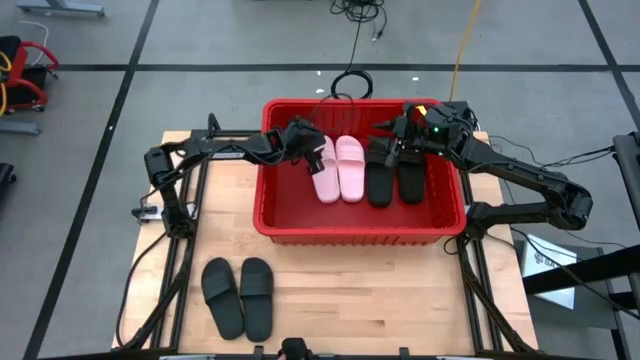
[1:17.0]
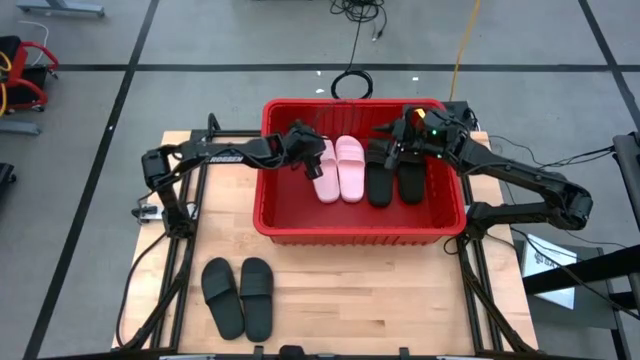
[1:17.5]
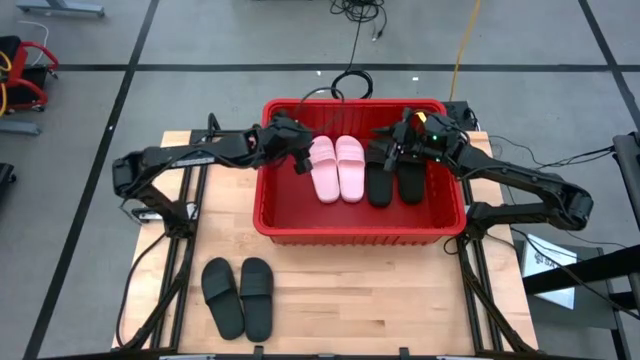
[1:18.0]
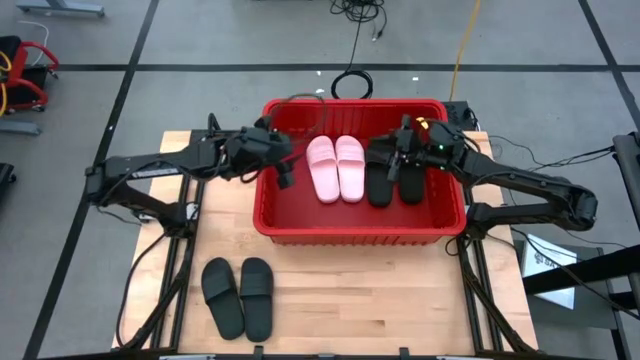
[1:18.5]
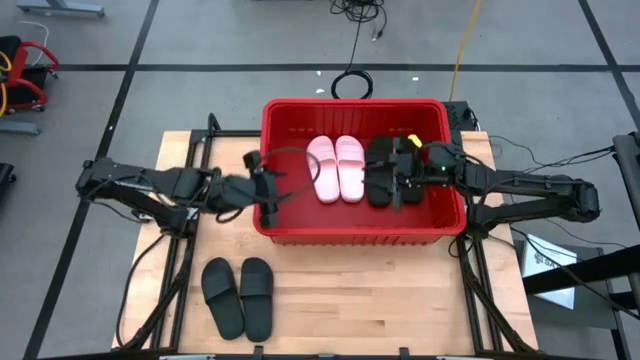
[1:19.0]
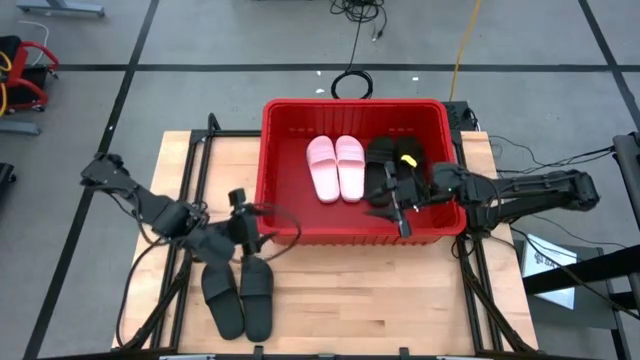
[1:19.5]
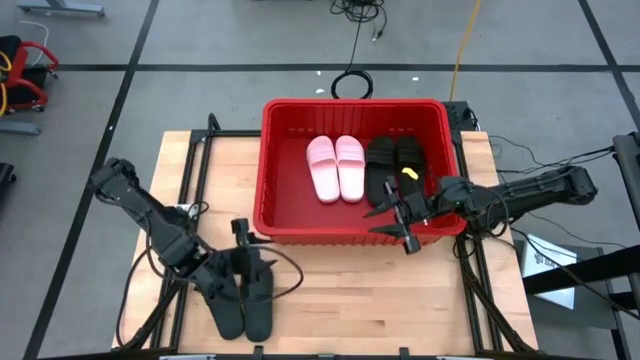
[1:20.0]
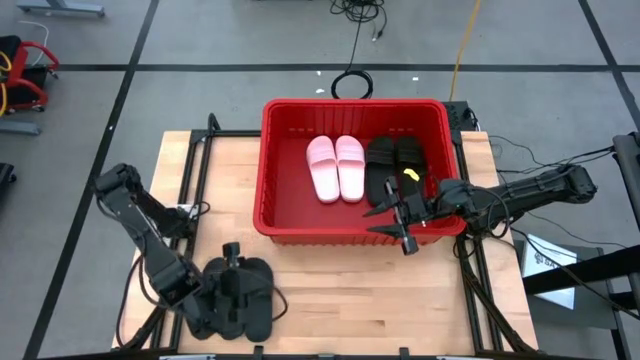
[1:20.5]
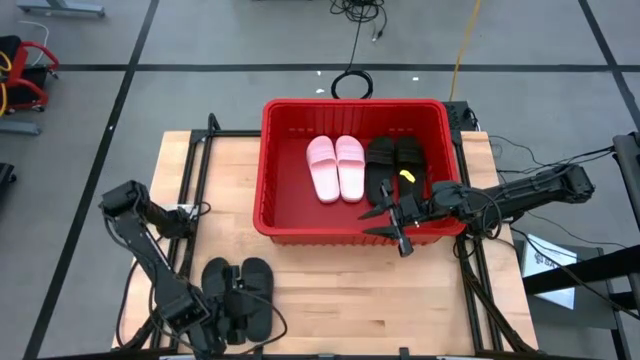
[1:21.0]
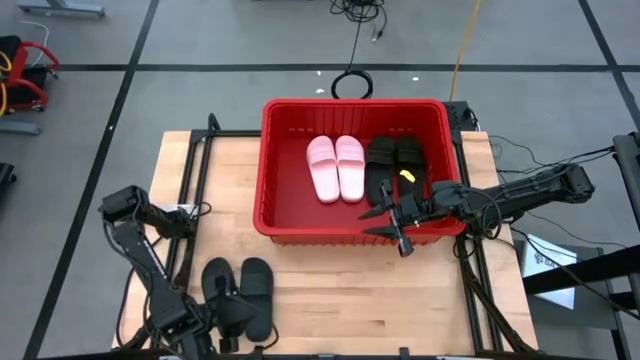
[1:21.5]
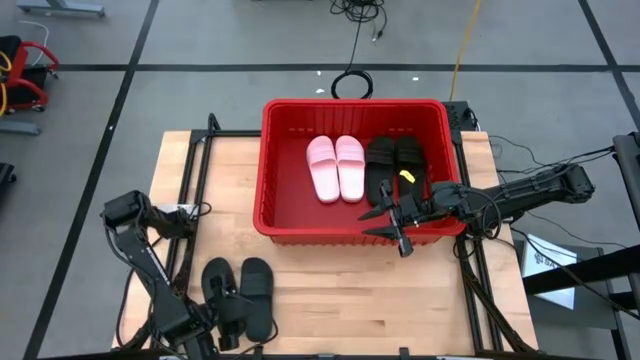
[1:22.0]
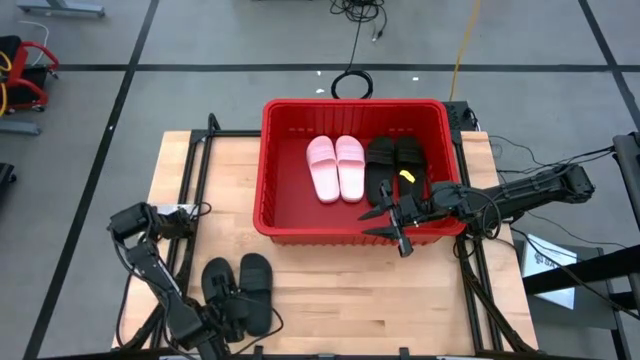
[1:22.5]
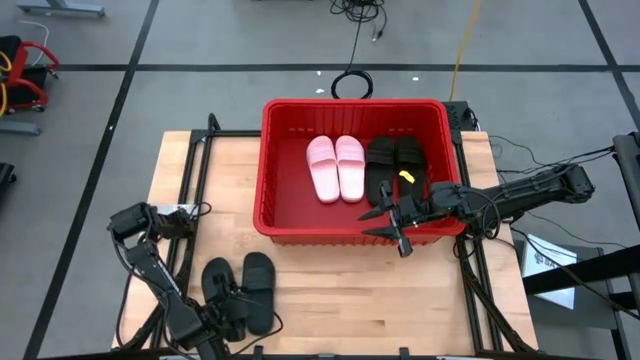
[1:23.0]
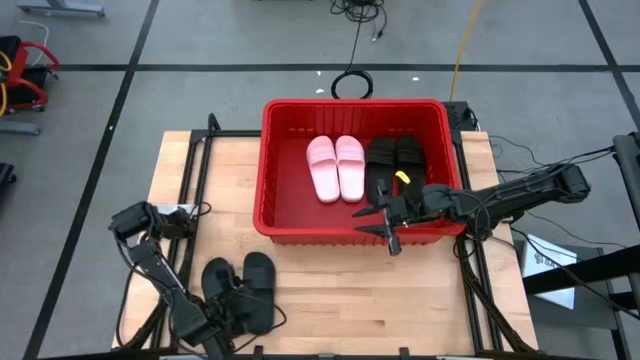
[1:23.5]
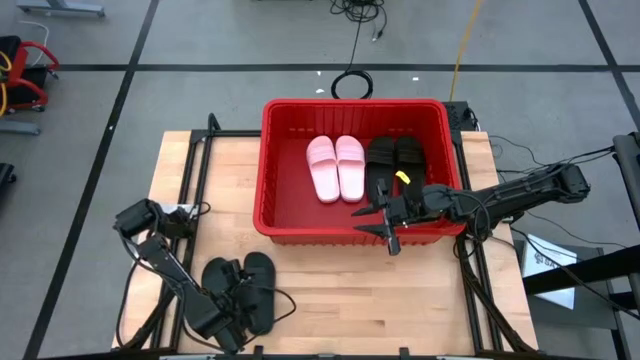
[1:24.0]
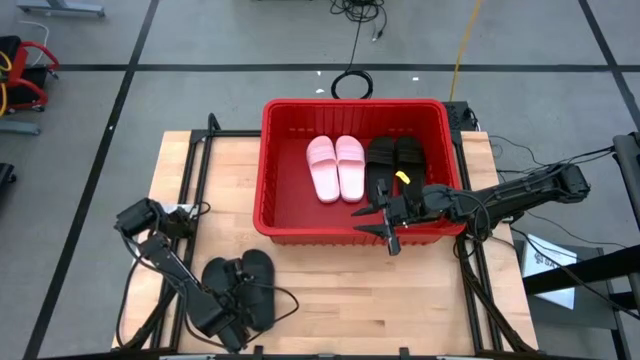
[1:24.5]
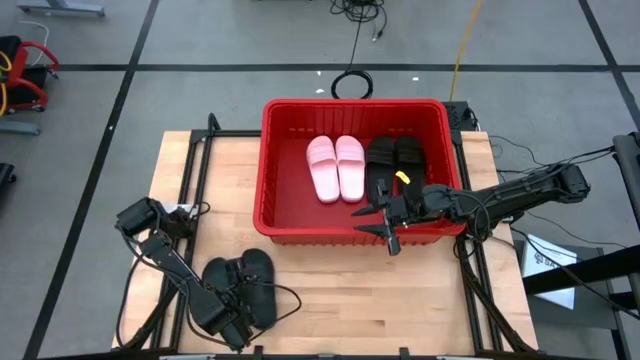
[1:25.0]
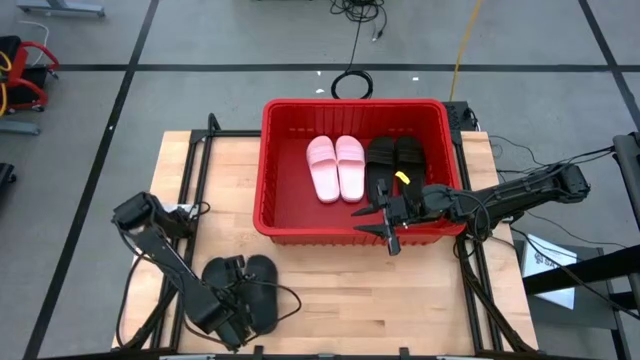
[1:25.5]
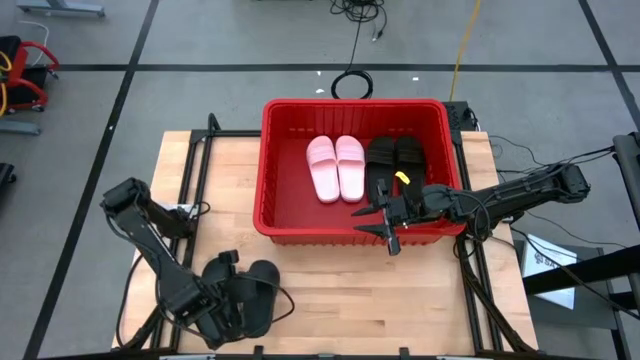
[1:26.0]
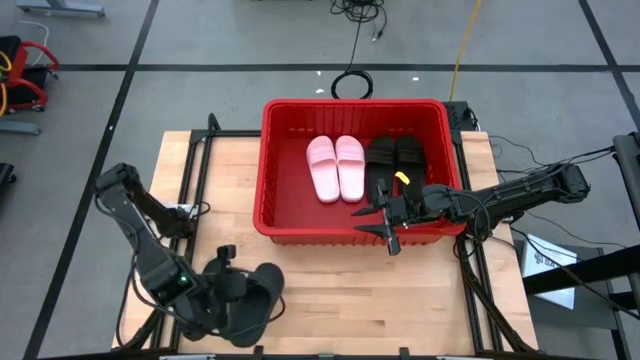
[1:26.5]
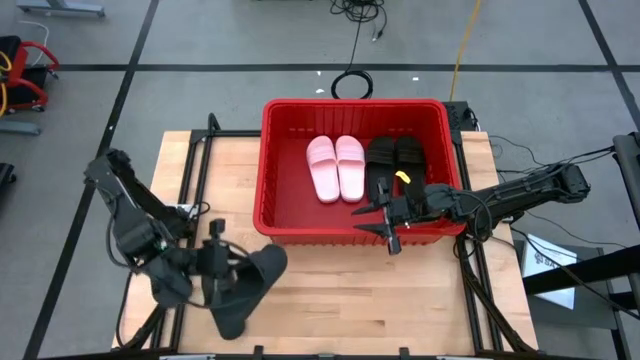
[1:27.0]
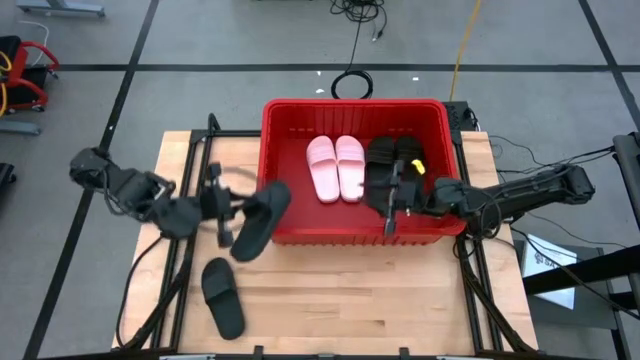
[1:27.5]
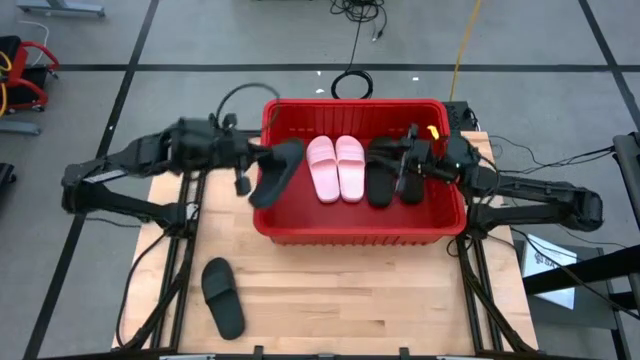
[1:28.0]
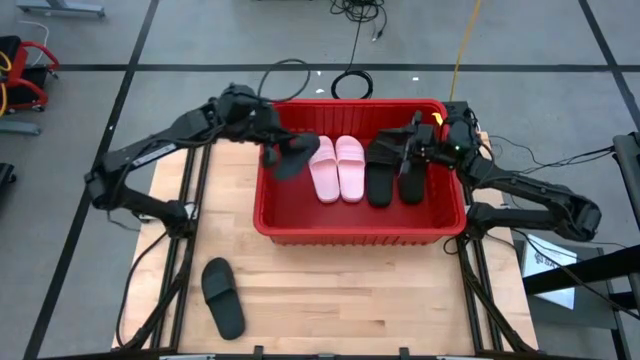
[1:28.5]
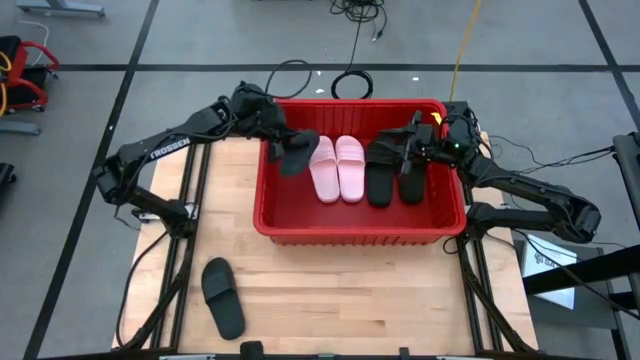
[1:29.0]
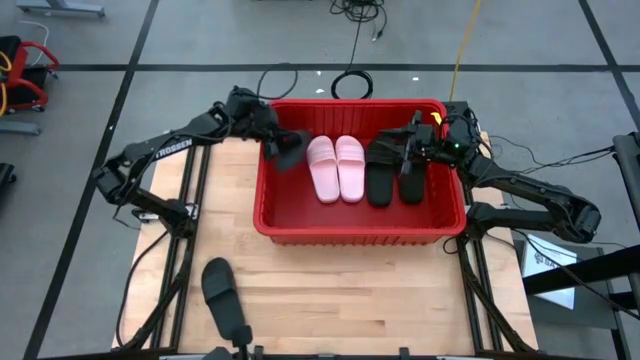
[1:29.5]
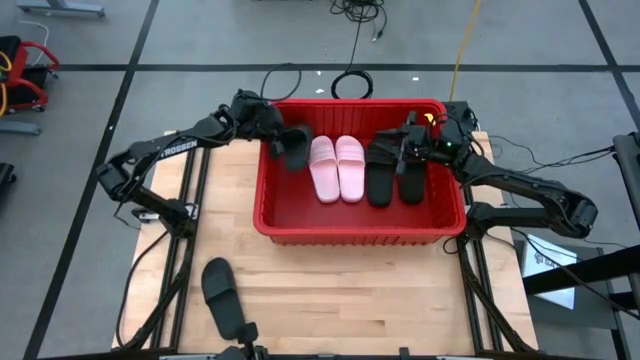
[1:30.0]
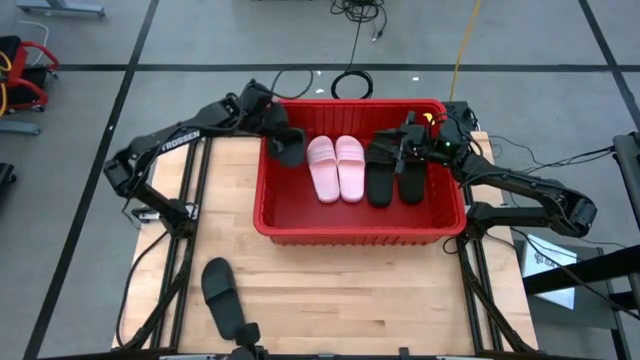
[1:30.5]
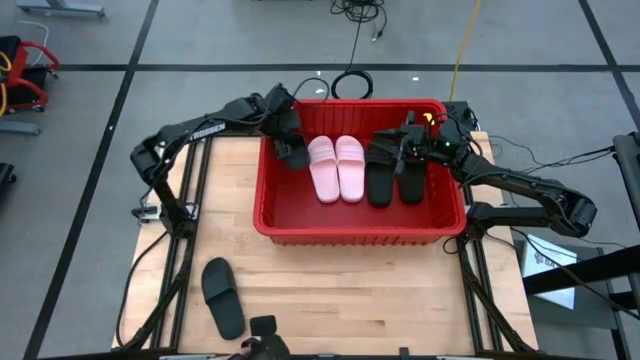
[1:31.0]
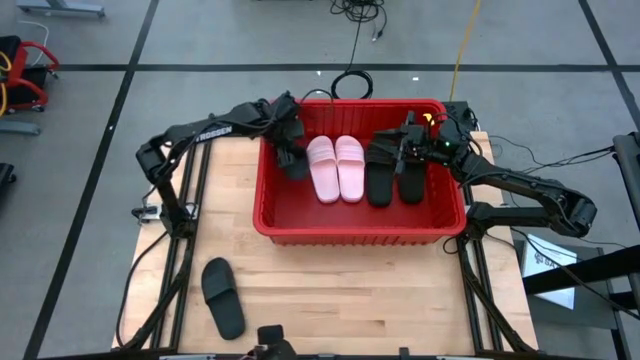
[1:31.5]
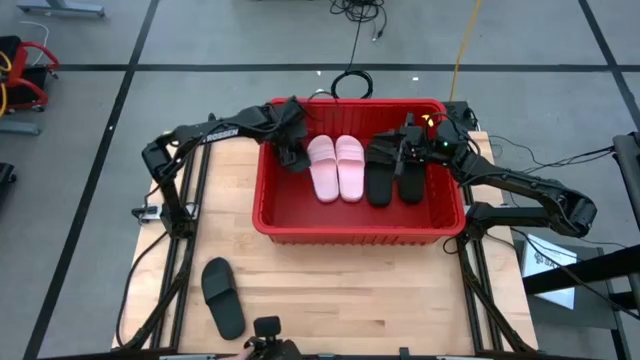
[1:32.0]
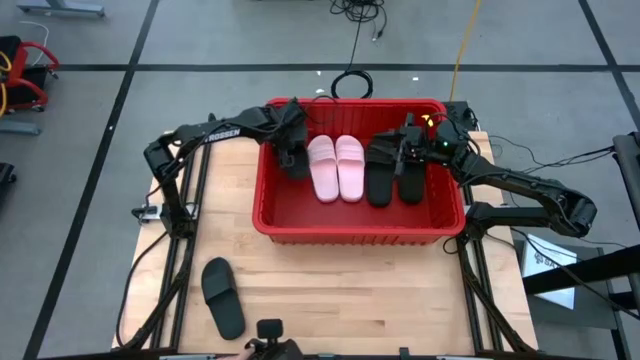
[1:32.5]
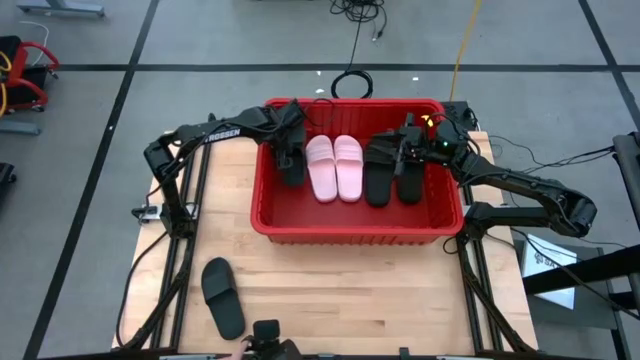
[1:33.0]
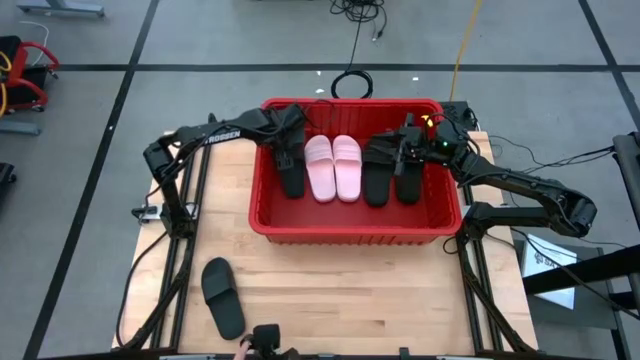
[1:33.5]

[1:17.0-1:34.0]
Task: Pick and place slides into bin
Put the black slide into the red basket
